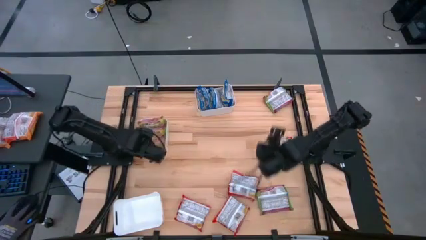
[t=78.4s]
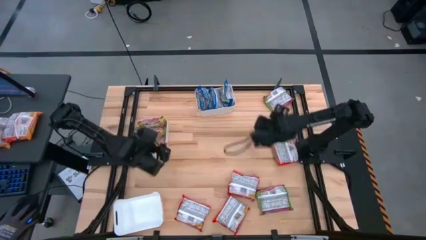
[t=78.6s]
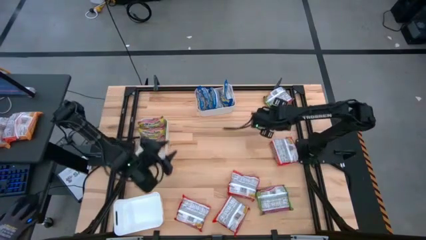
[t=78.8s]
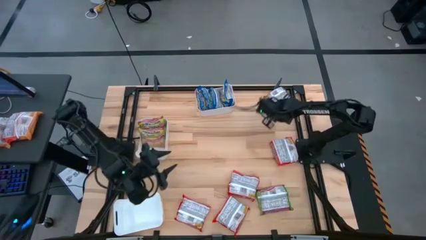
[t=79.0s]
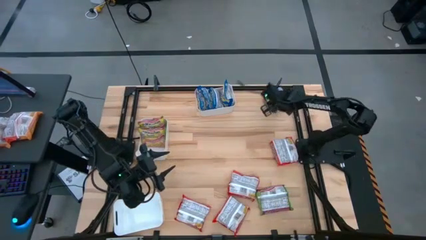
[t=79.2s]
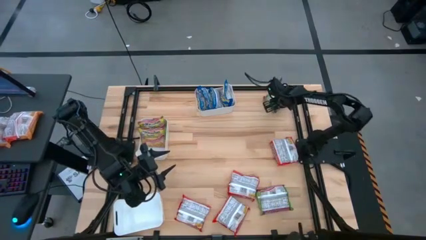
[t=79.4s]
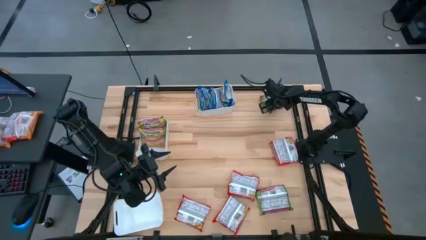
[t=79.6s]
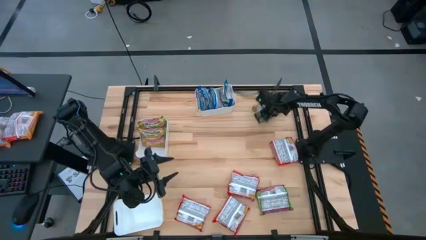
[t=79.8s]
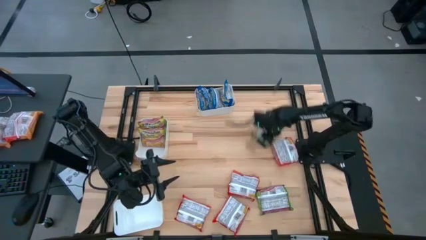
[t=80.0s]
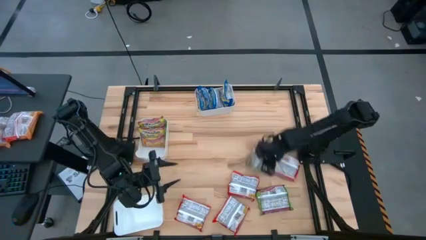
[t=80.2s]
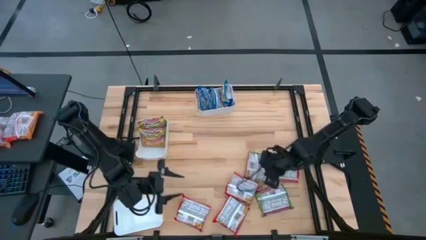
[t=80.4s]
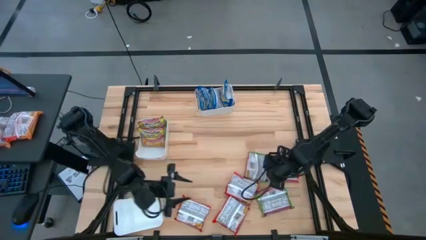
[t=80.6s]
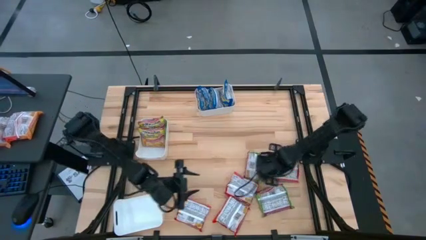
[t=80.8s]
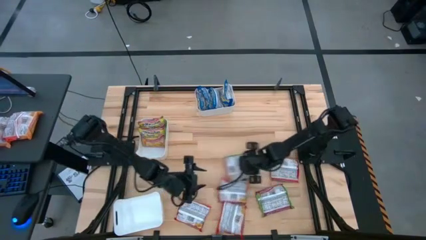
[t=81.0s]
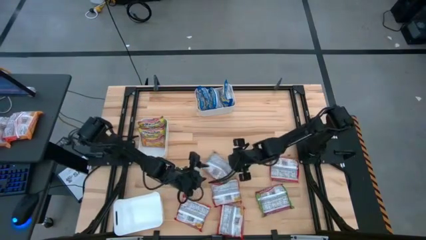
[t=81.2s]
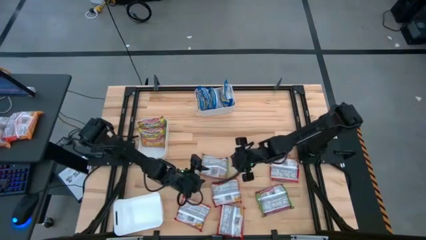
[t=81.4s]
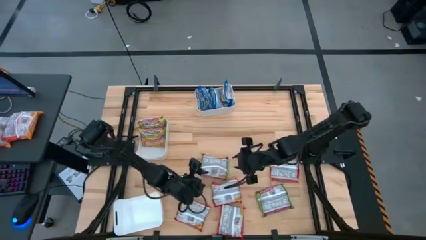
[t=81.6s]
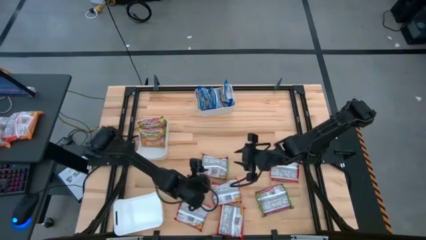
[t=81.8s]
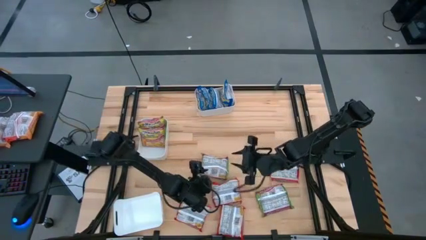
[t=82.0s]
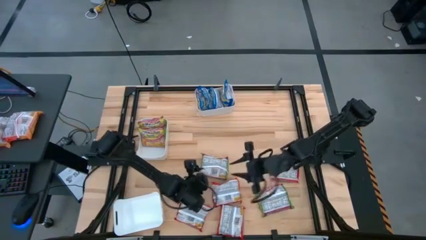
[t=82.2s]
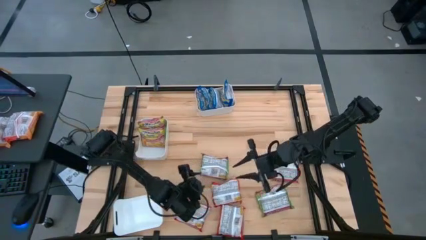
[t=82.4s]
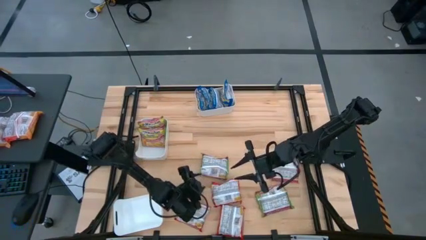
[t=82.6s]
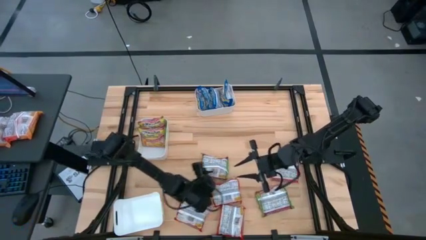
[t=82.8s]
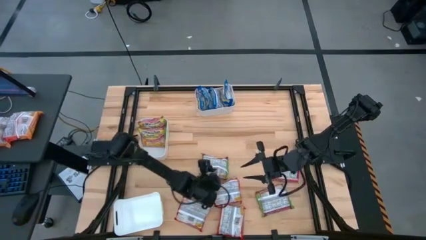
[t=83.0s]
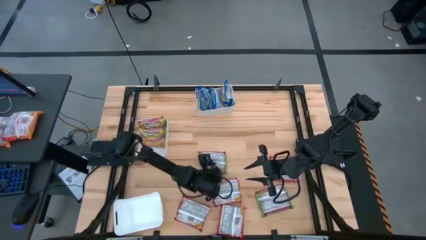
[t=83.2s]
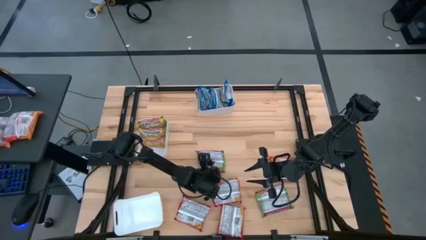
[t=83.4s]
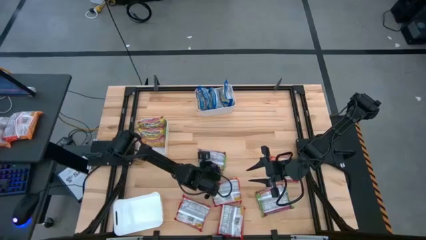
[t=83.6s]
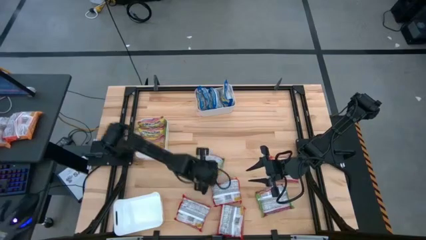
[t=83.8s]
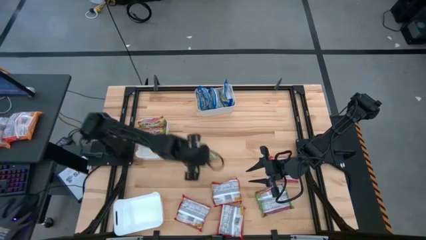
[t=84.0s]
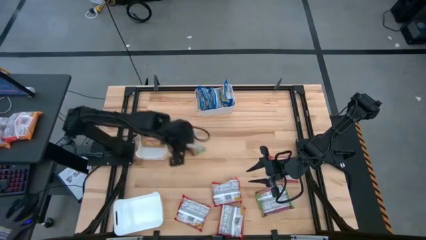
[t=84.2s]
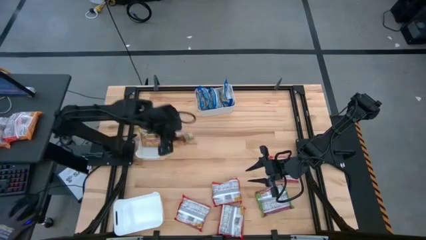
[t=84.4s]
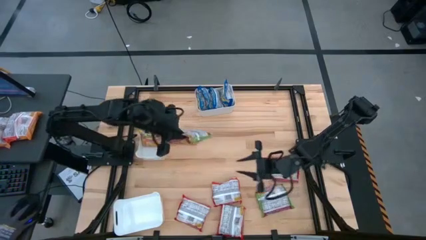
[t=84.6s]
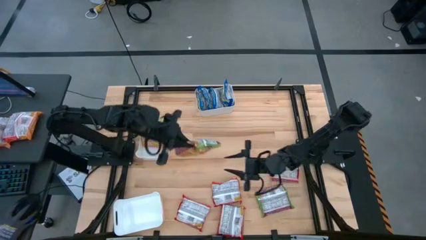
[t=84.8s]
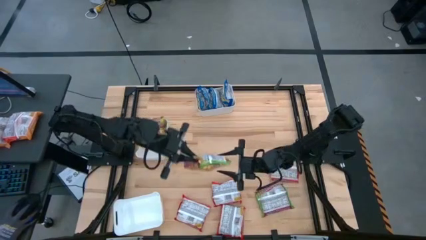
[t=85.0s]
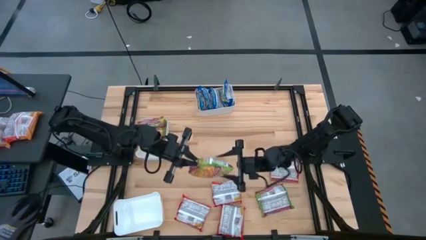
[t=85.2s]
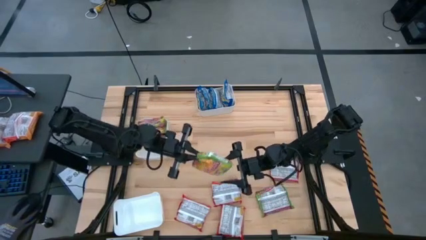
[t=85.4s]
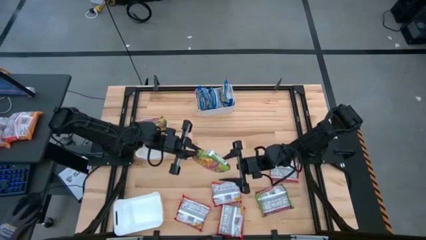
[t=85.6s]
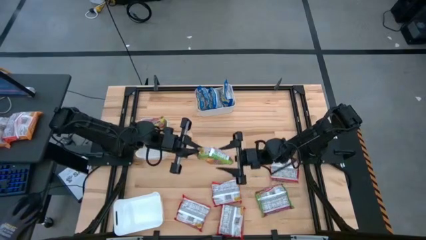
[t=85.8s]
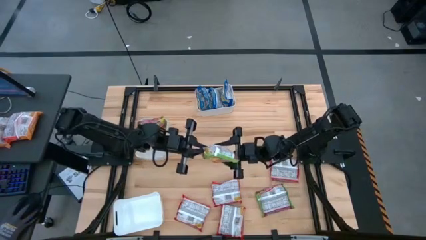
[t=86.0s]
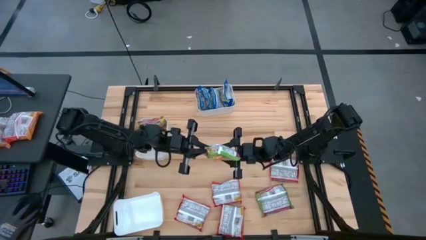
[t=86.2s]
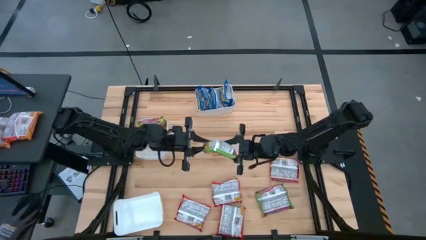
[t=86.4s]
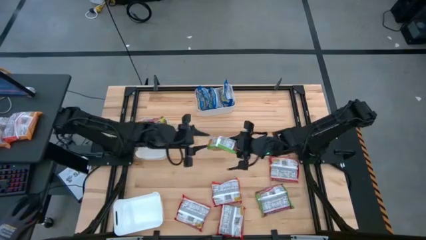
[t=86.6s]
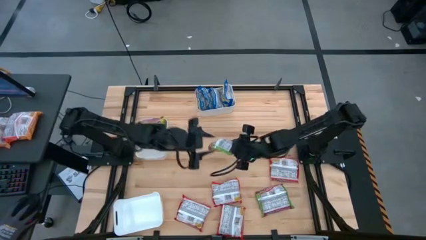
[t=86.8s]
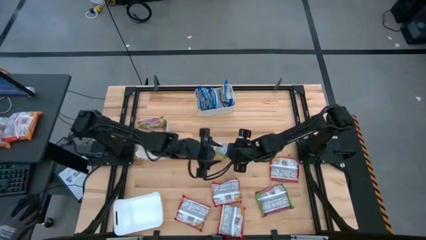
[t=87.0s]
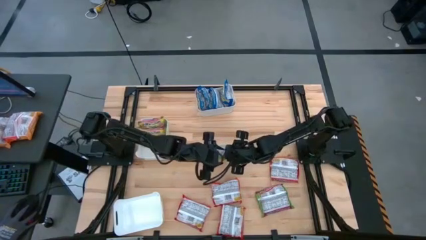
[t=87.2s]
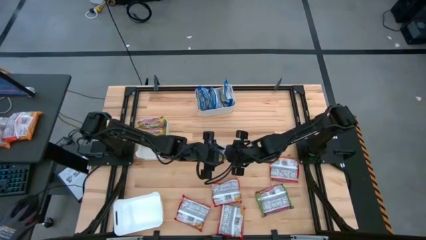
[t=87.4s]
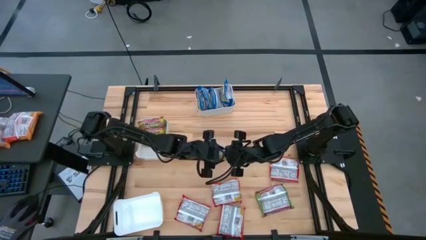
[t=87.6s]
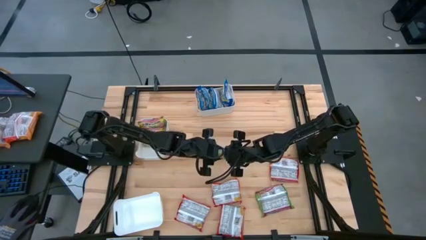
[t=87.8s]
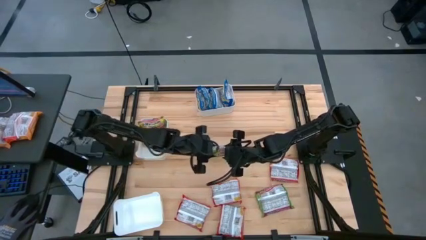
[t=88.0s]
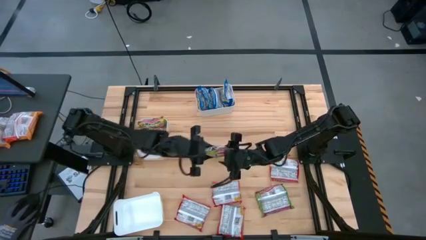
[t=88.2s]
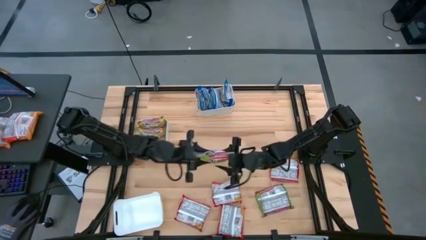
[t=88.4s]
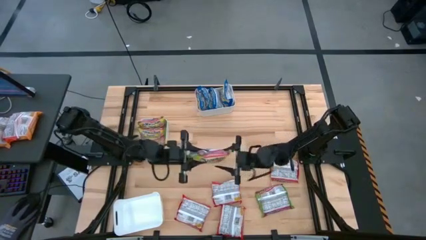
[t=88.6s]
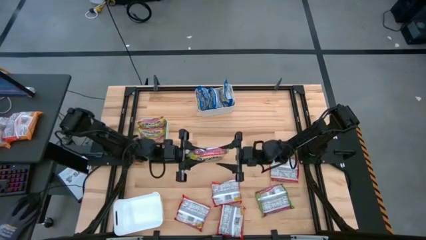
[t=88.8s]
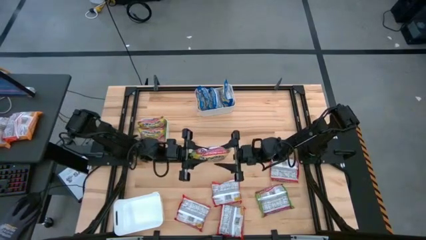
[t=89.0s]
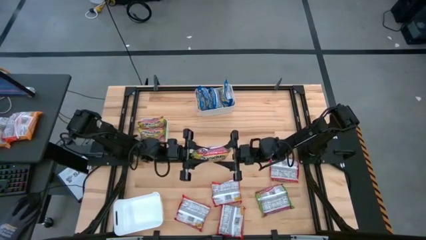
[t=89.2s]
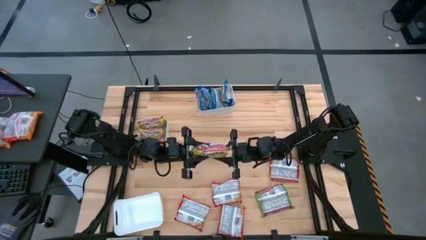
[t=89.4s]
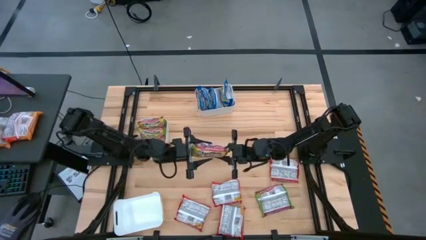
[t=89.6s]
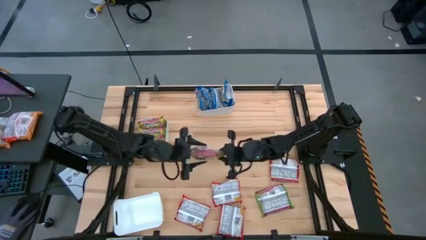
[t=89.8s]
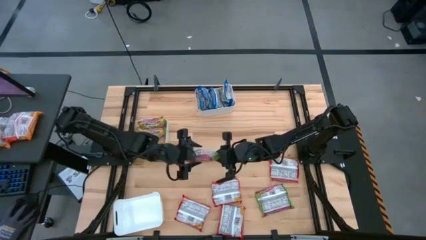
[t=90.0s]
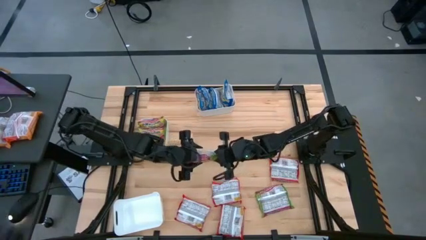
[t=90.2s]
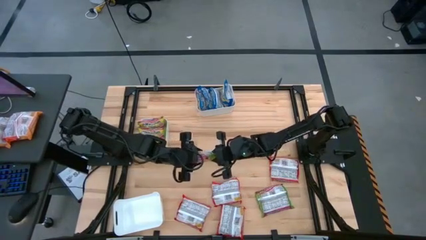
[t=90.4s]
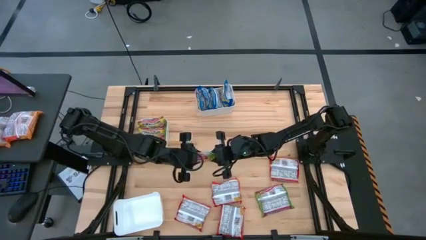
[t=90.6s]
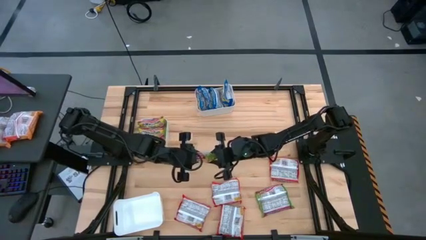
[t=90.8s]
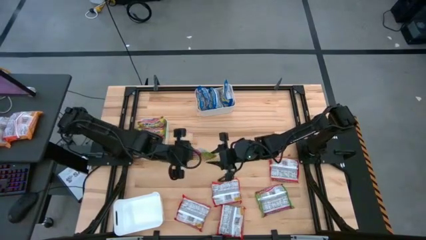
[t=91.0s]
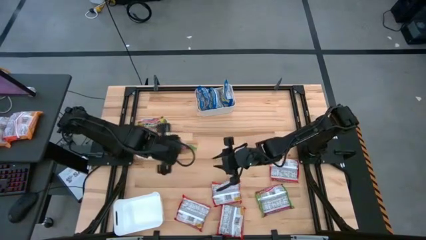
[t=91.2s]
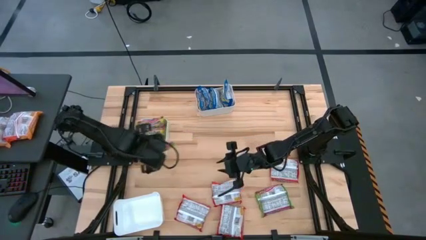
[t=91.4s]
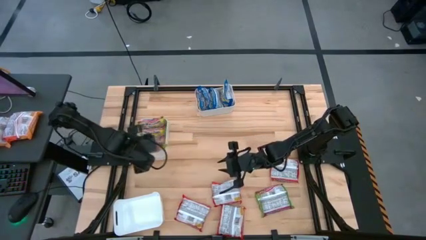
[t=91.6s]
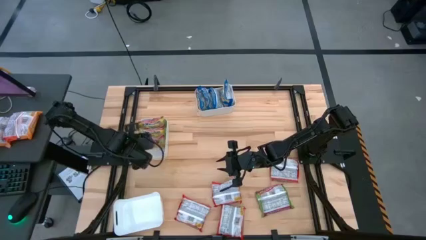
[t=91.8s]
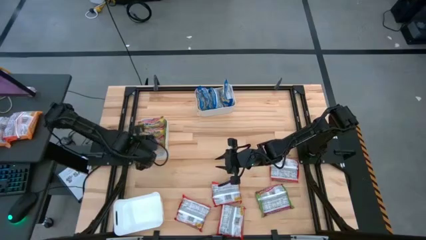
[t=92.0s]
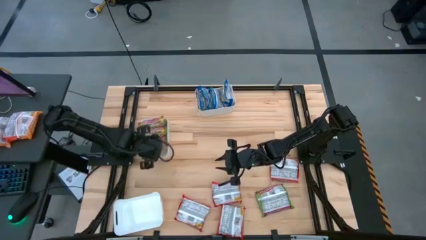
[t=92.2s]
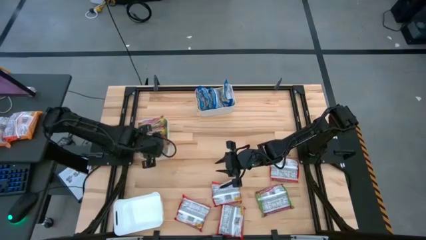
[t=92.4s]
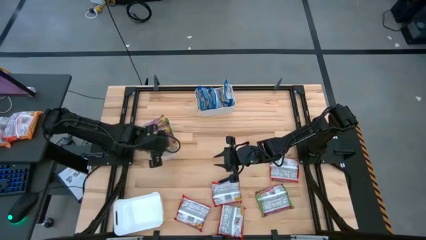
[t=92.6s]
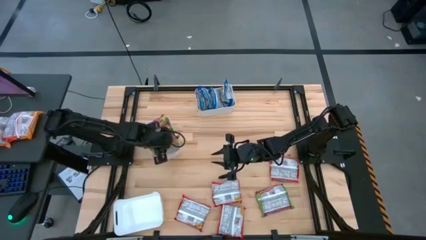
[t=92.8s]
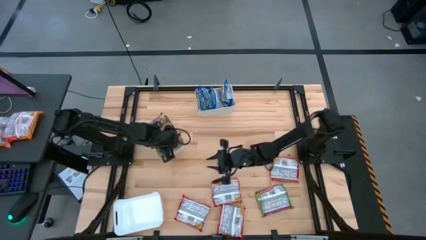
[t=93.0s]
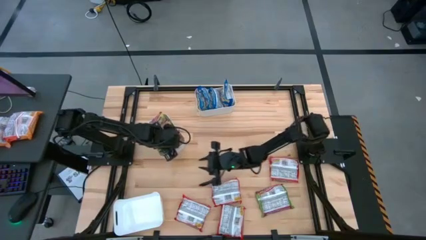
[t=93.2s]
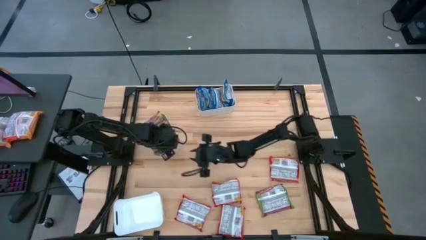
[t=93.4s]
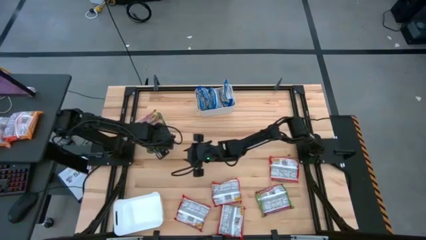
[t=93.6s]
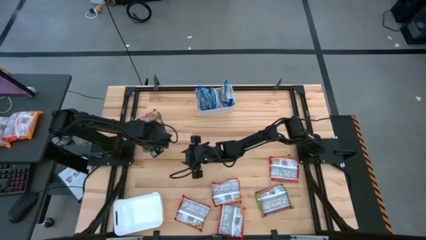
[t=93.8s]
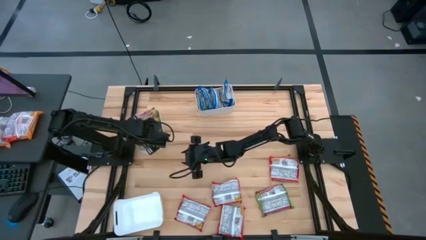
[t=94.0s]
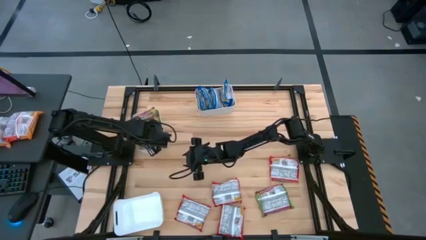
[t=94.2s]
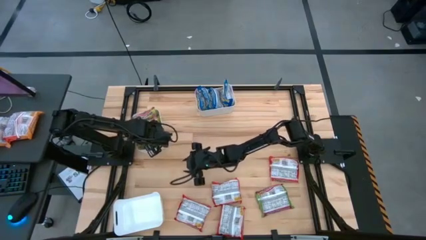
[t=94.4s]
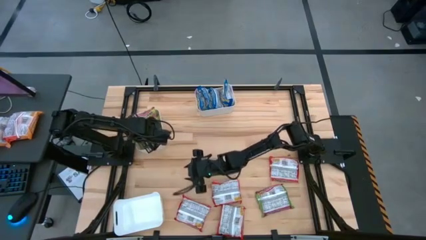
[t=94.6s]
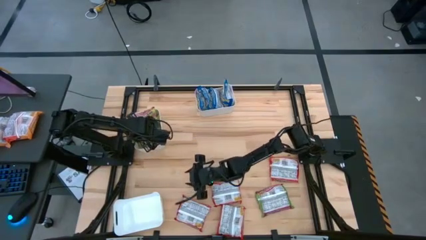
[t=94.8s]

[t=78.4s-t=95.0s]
Task: Sort Maruchan noodles
Put the green noodle pack into the middle white bin

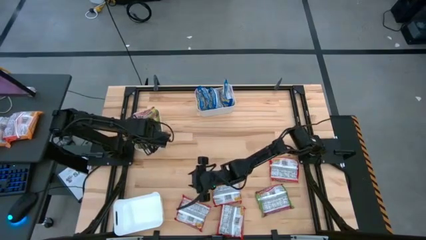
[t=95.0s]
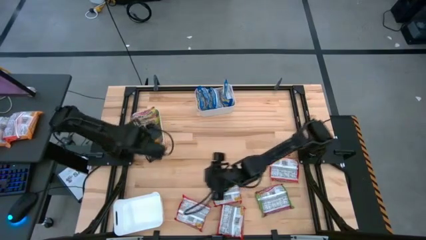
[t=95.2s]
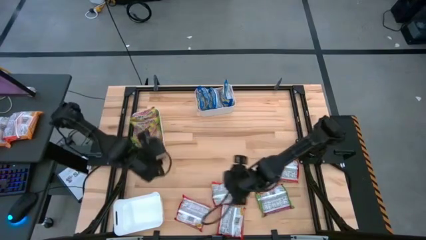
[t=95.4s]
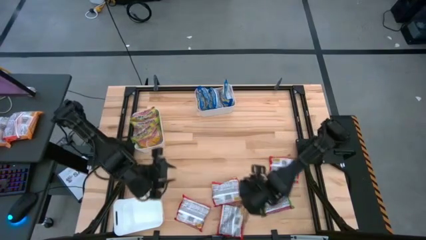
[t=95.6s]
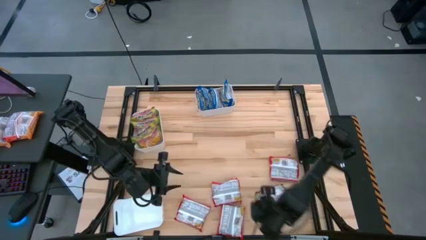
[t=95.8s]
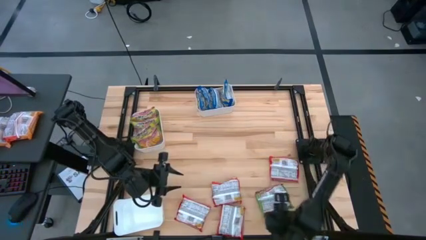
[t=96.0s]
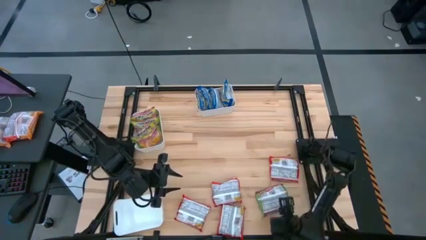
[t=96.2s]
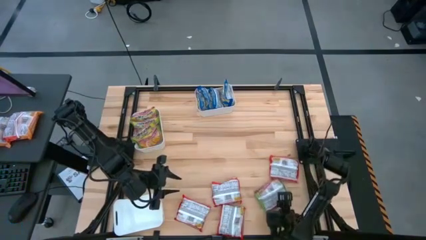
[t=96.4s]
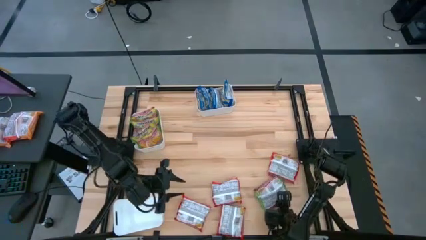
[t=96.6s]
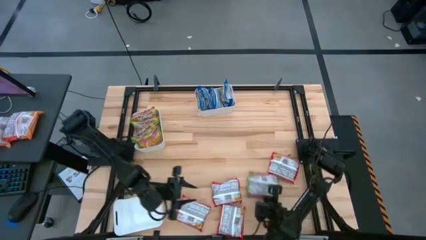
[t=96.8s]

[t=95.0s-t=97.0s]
Put the green noodle pack into the middle white bin
